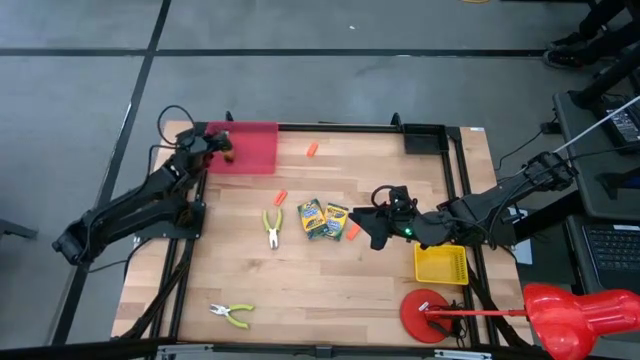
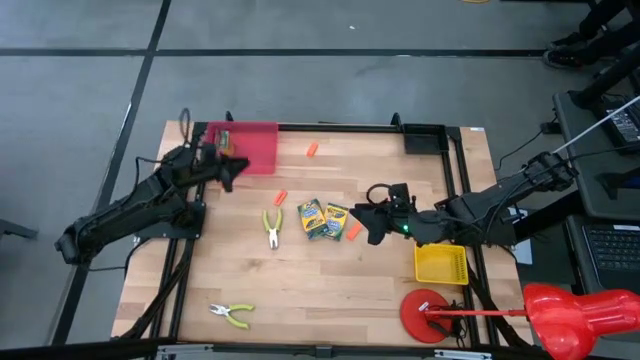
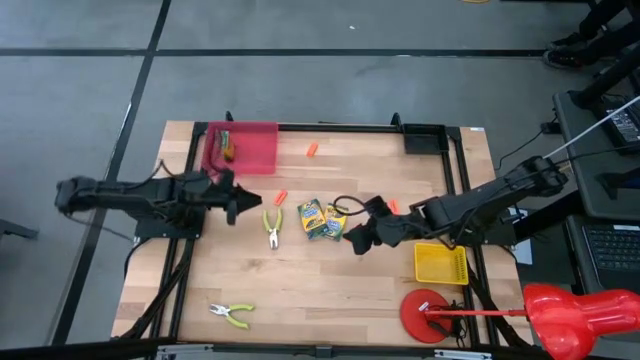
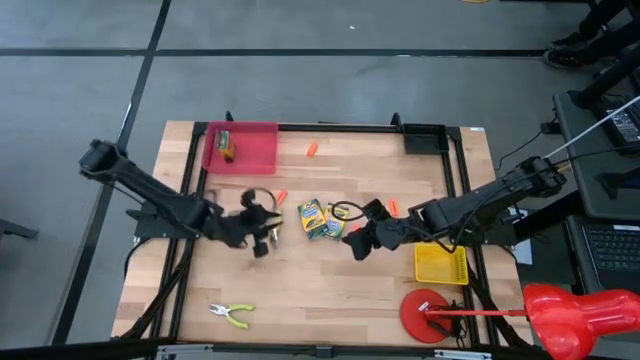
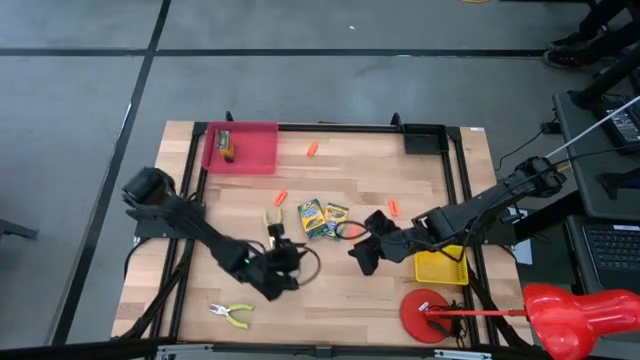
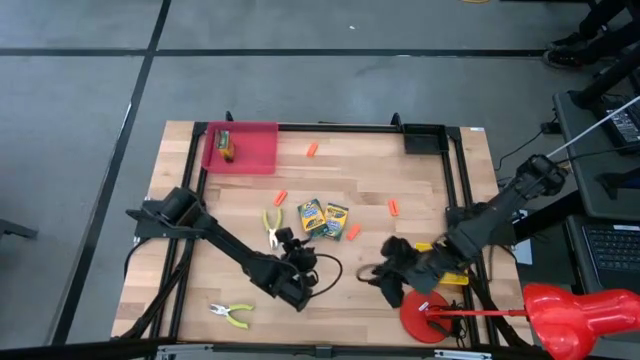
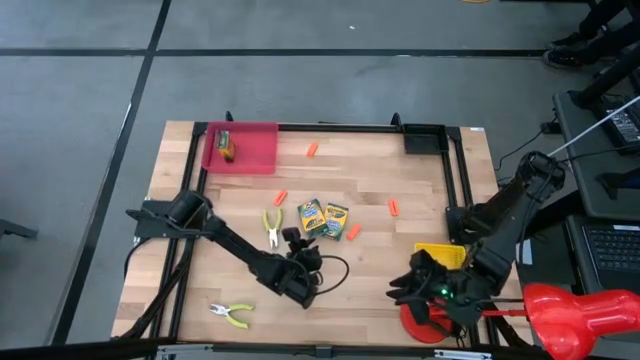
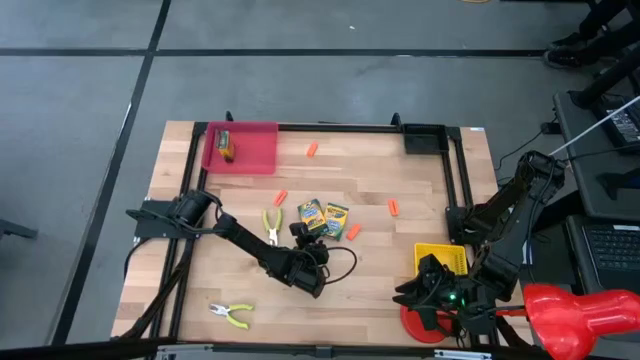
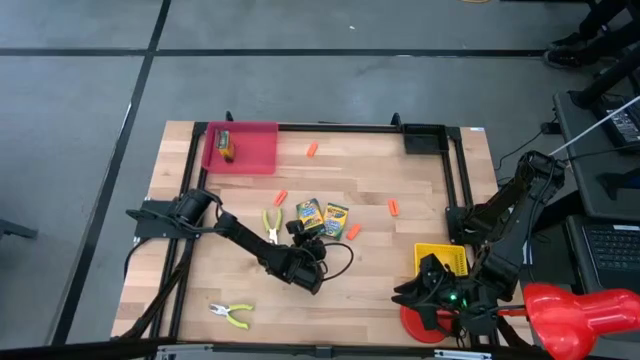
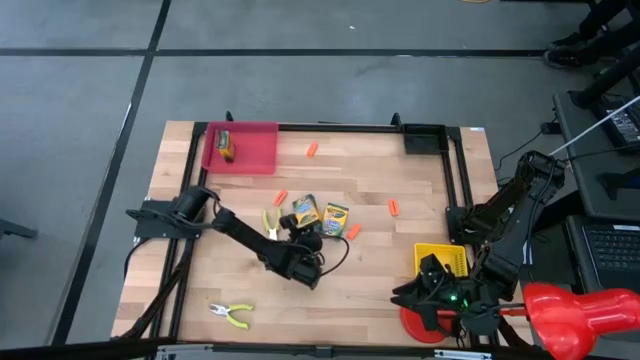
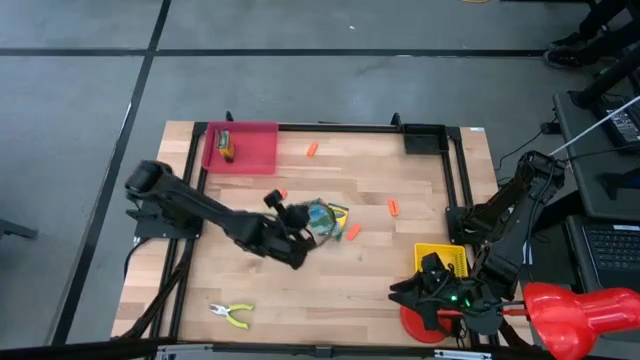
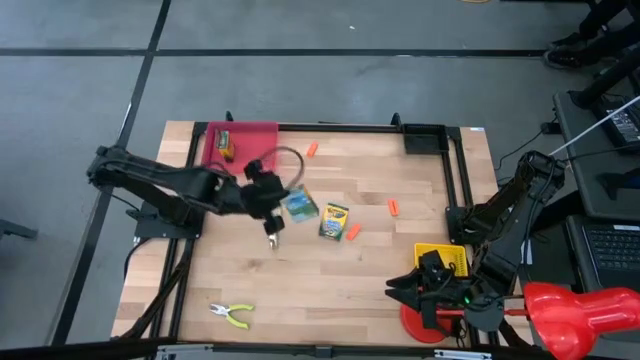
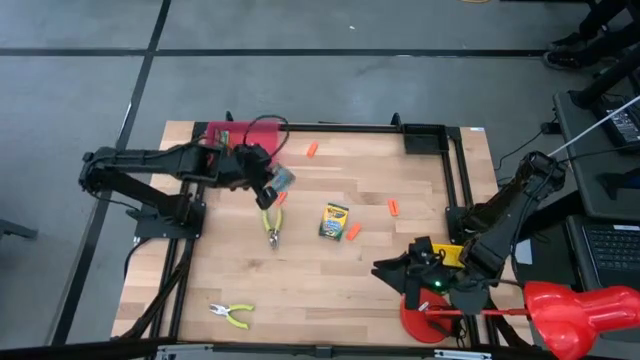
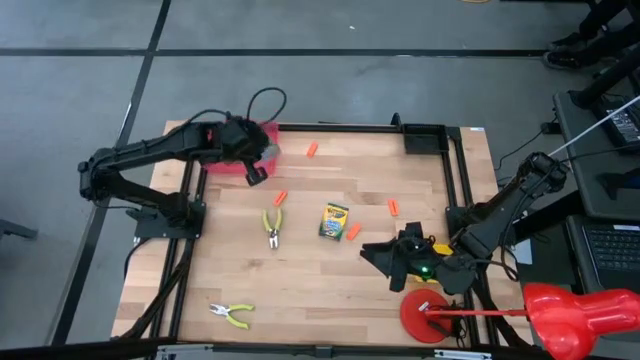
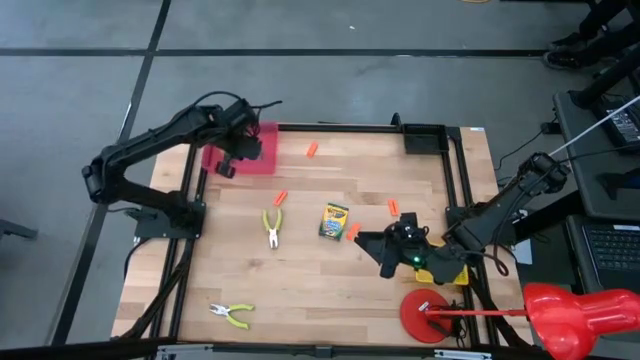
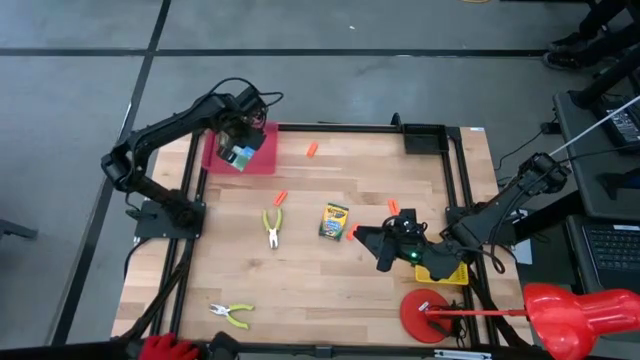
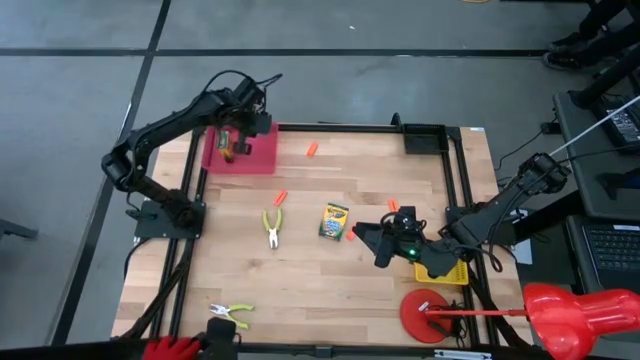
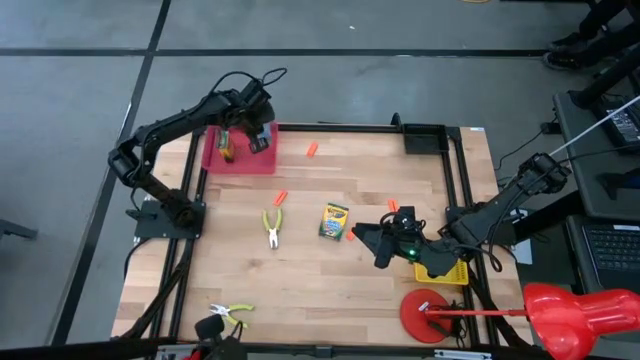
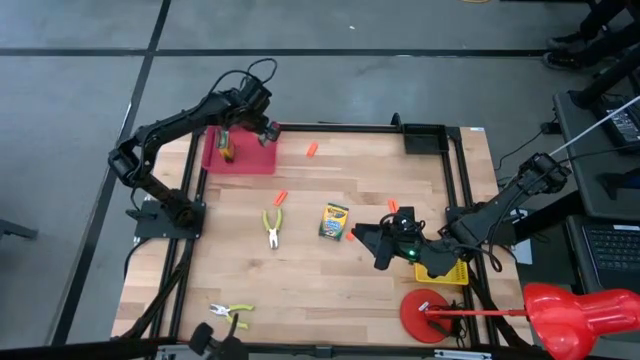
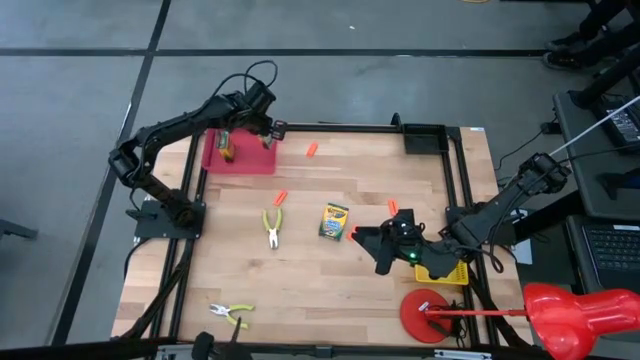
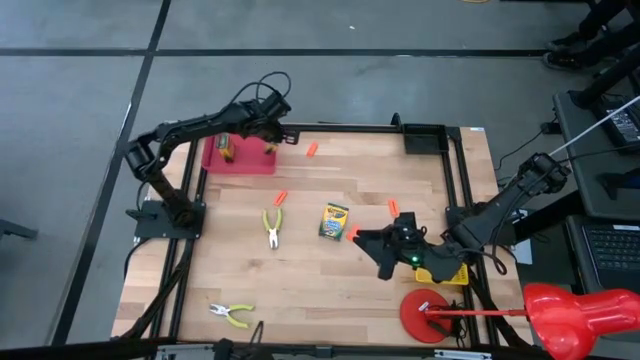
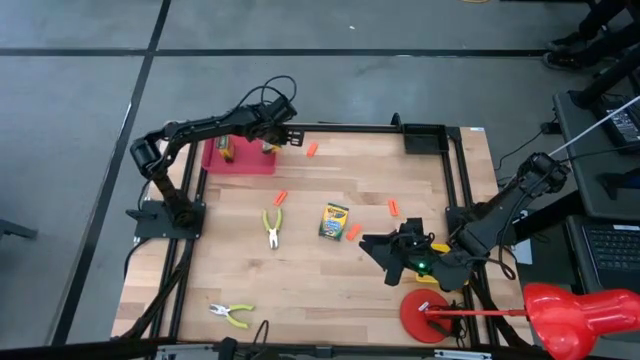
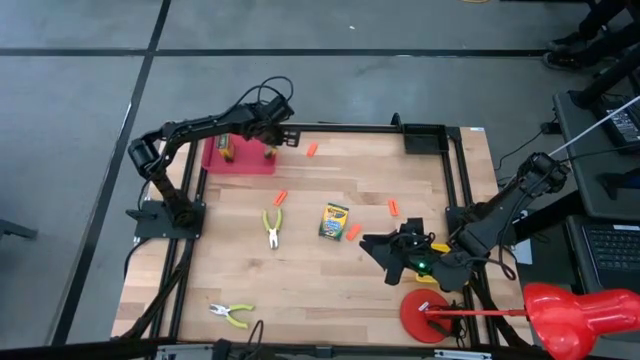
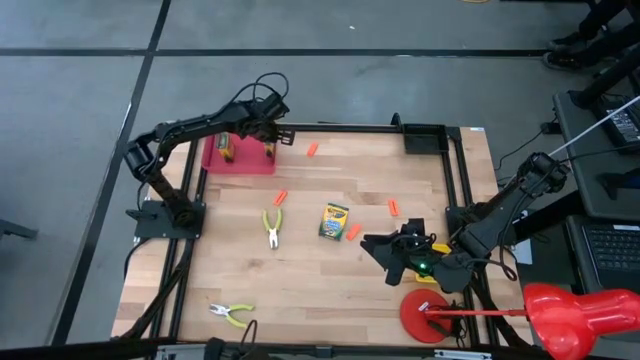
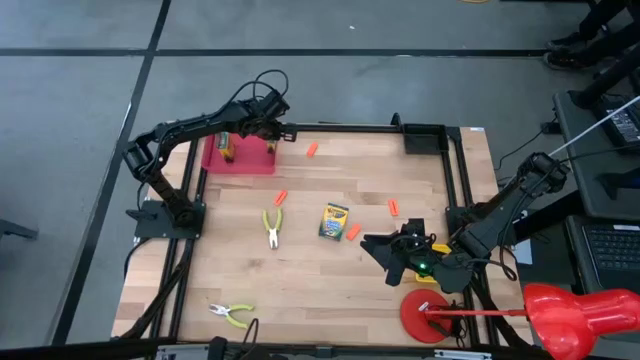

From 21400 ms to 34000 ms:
Task: Pick & Place School Supplies
Put the yellow crayon box into the pink bin
